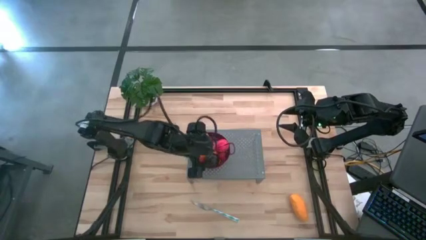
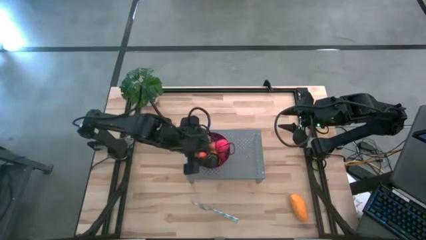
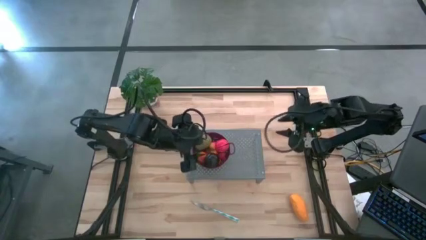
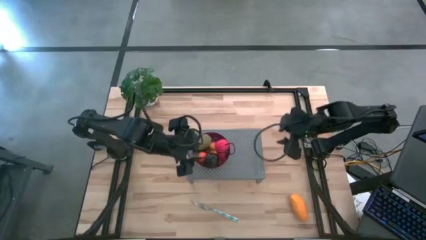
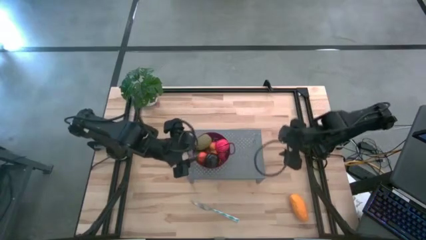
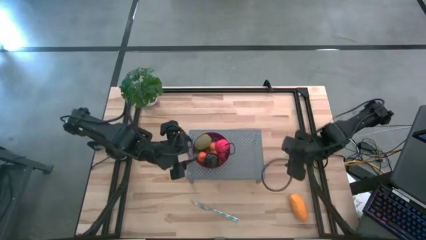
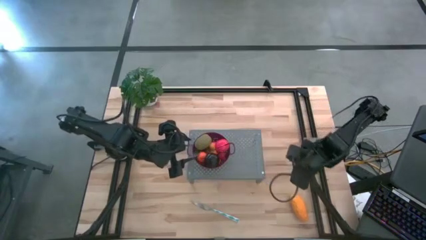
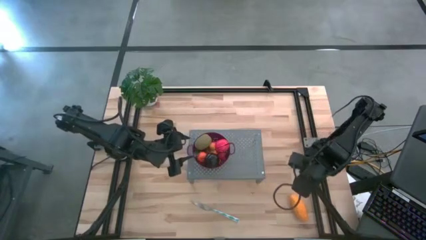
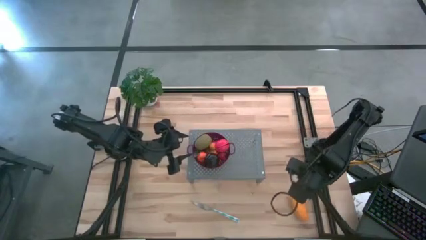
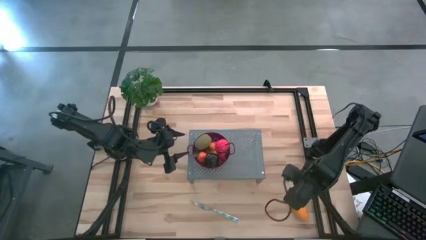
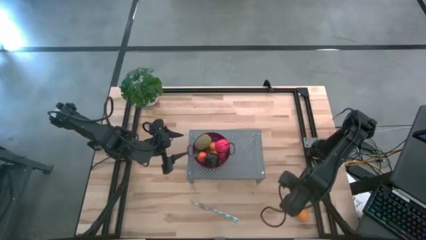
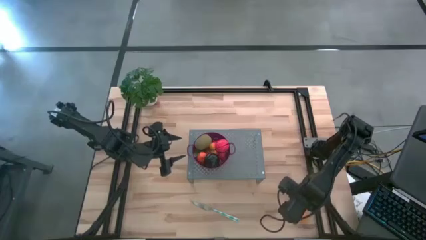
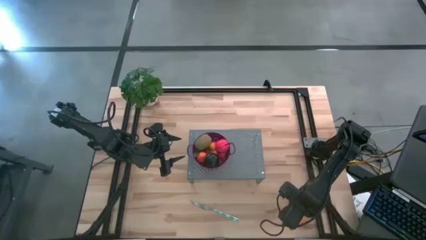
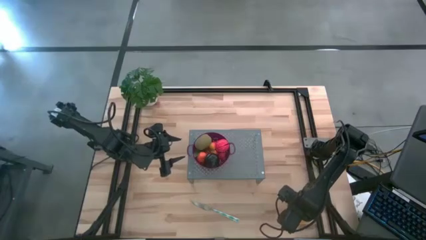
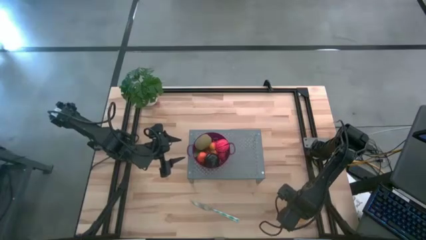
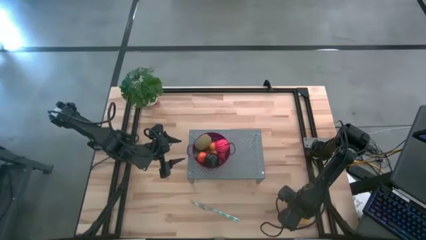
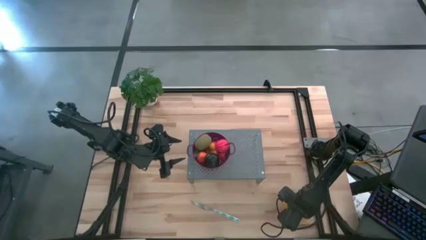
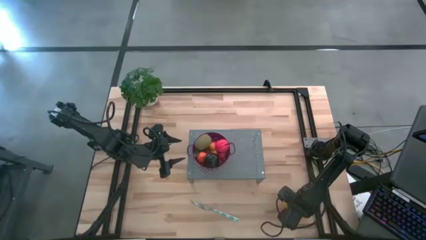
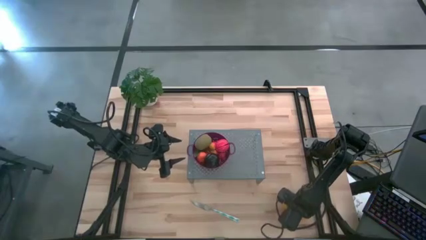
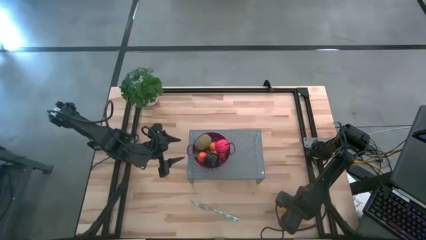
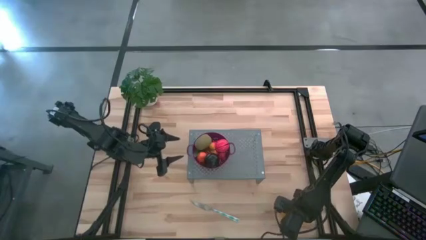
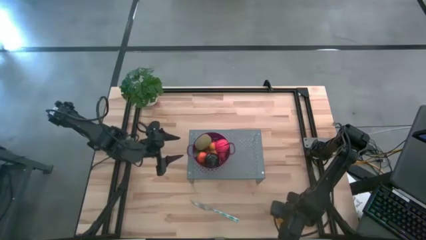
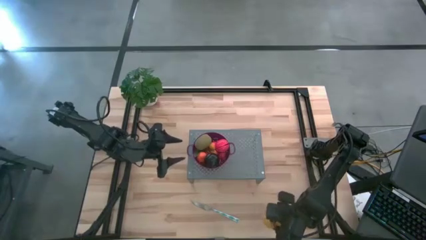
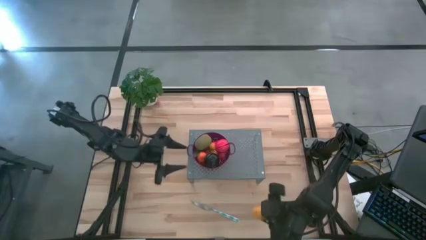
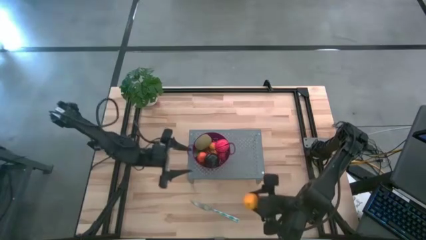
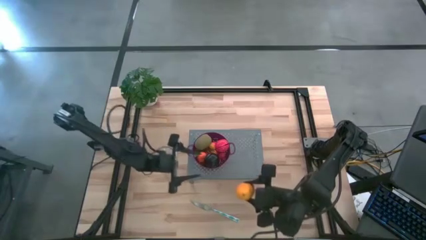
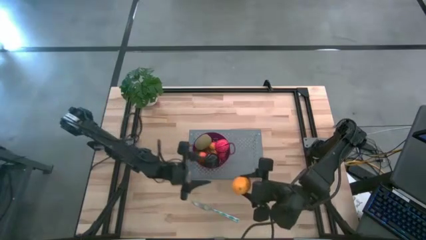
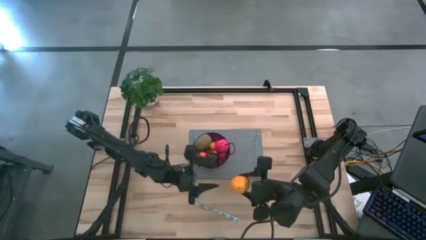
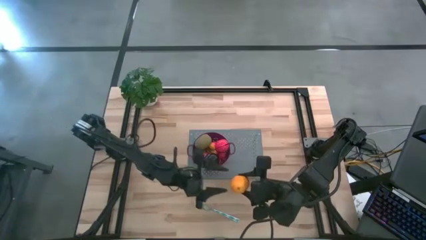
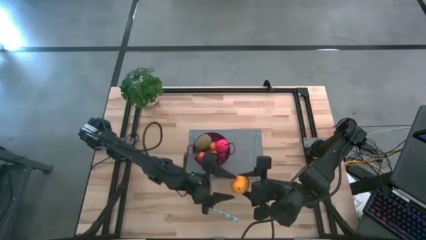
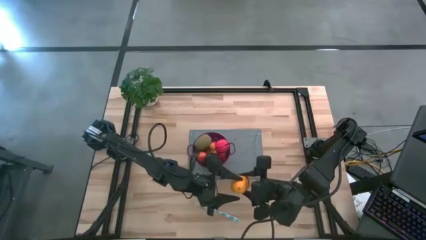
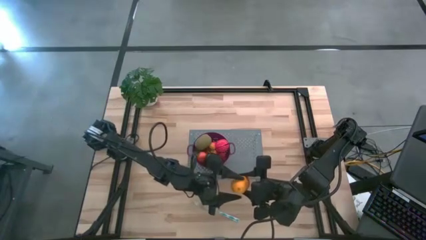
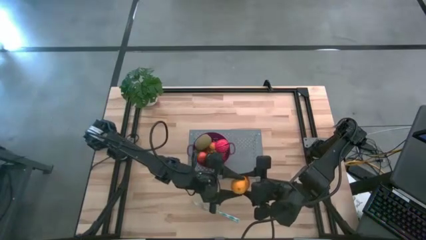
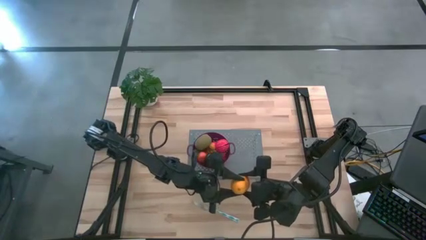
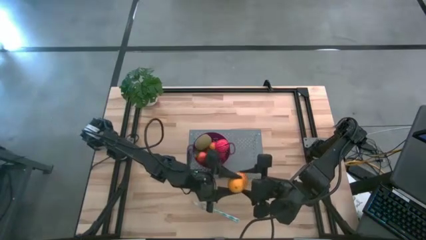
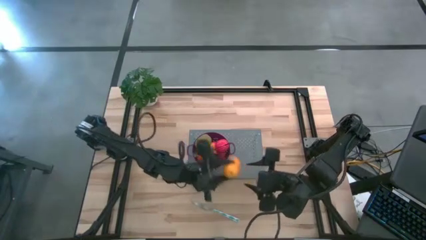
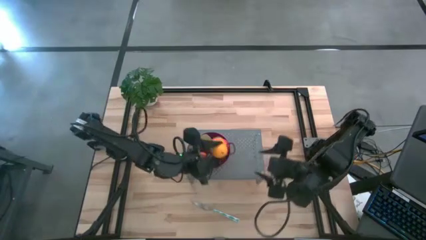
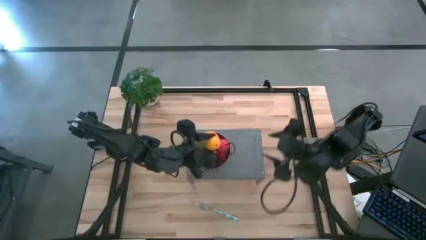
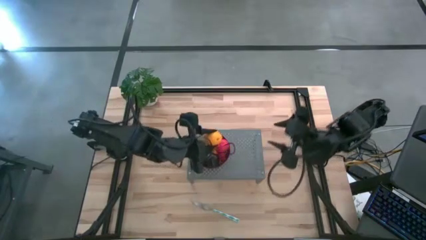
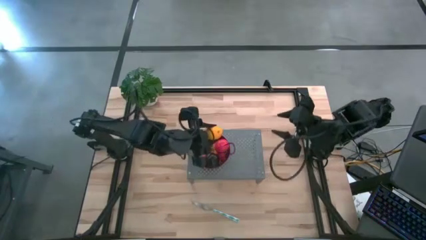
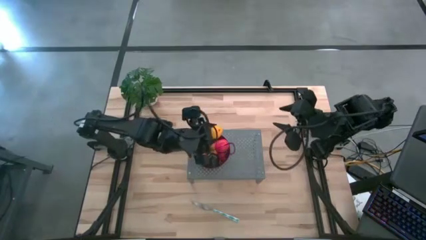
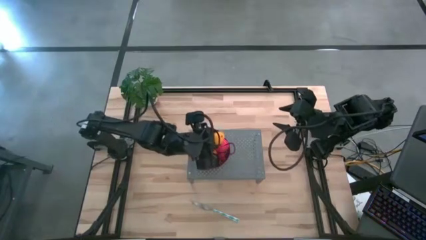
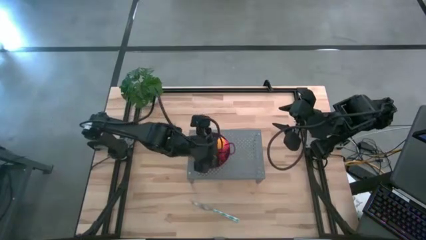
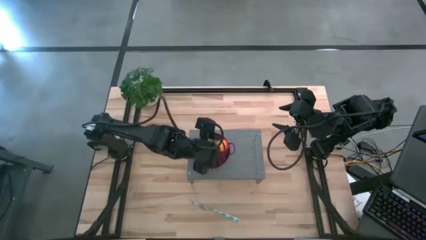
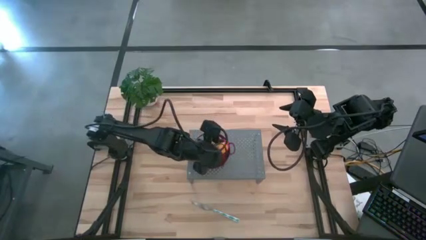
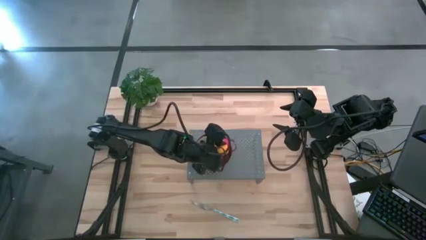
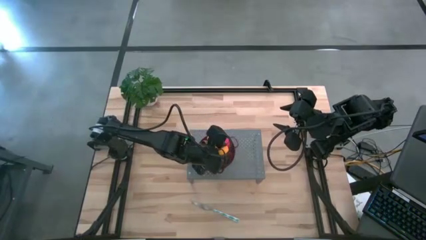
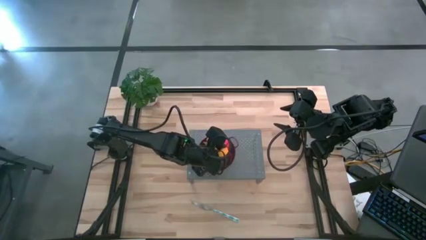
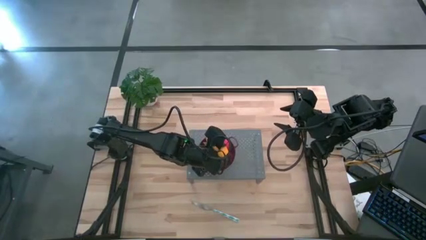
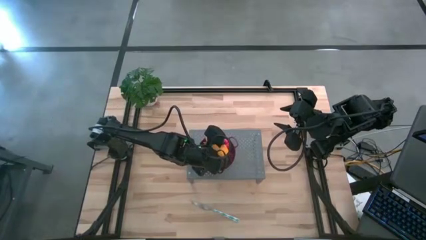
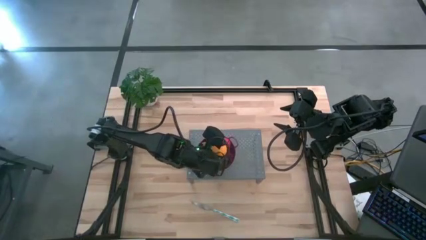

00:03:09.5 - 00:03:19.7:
Task: Pick & Place Fruit
Put the mango into the purple strainer bowl

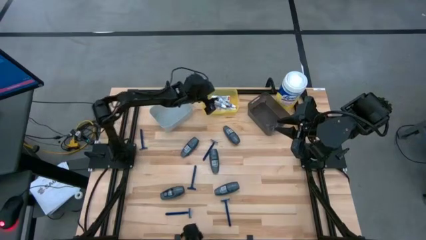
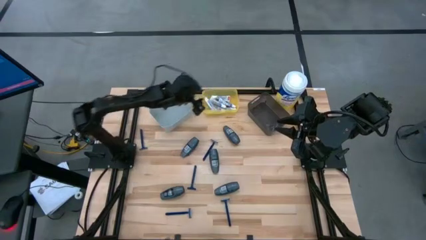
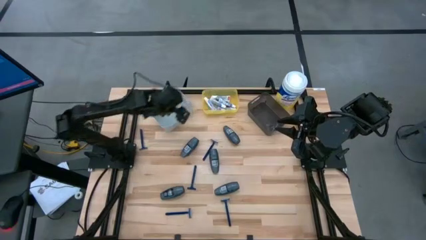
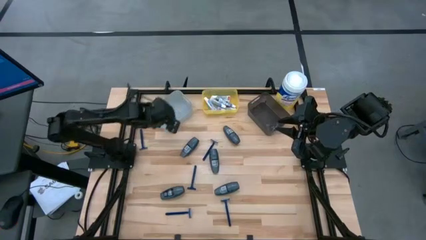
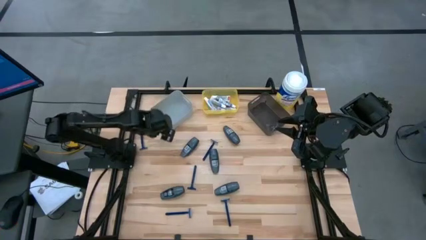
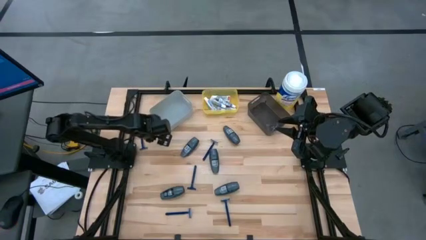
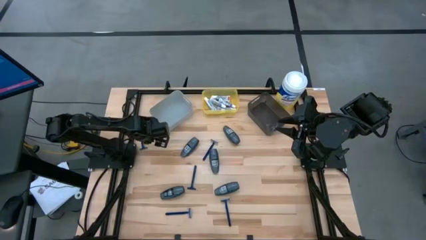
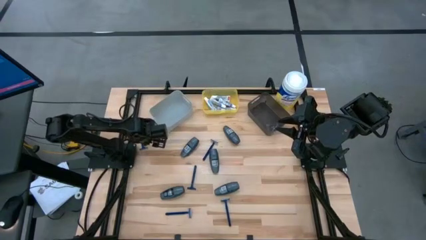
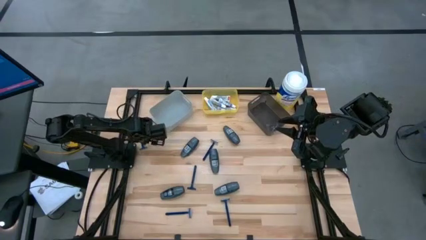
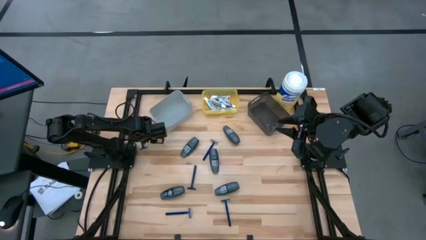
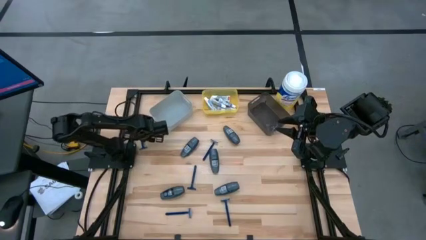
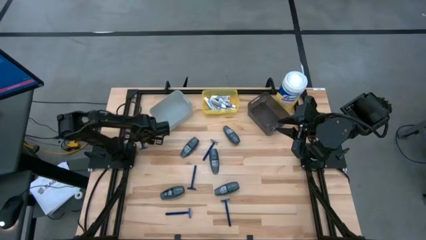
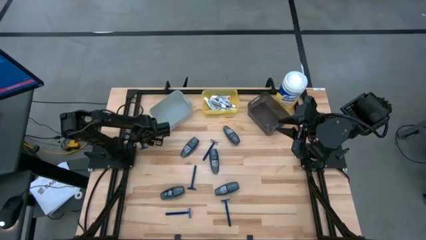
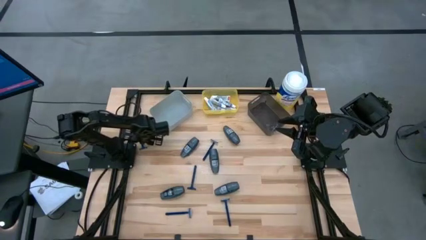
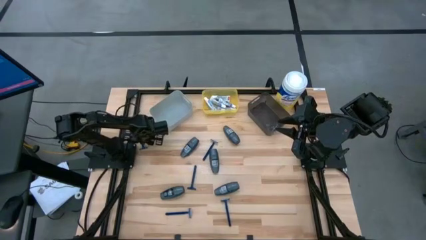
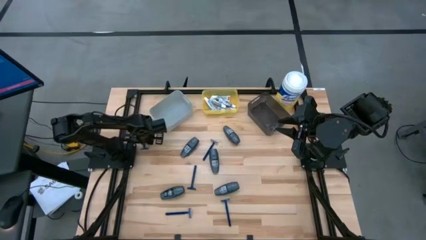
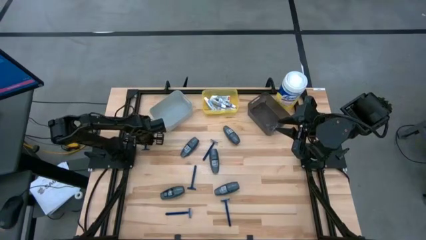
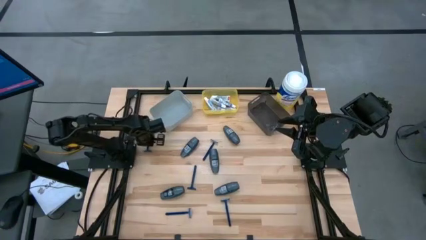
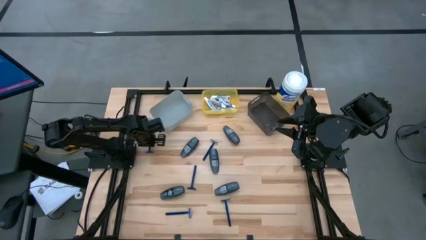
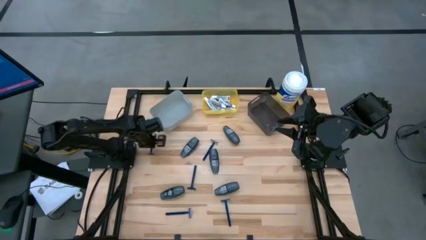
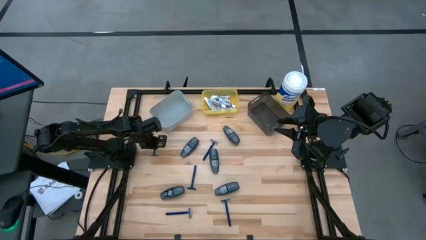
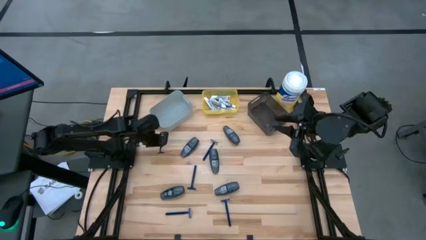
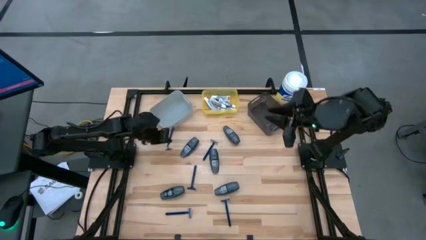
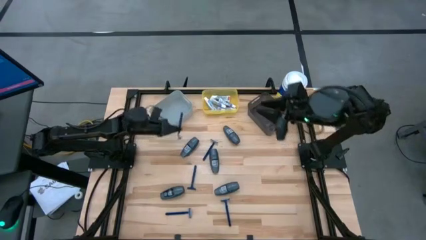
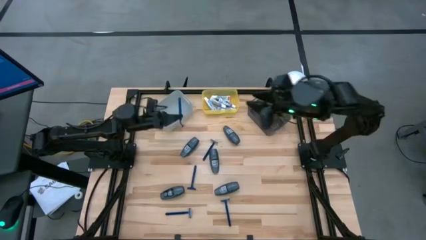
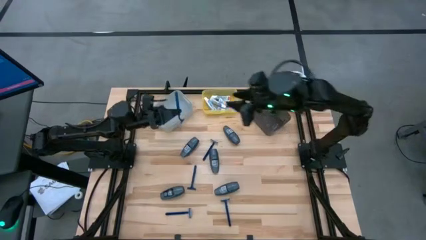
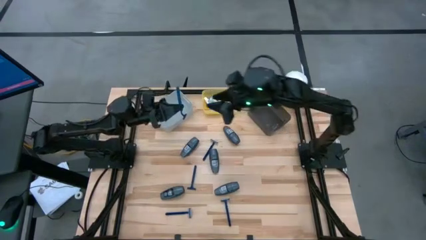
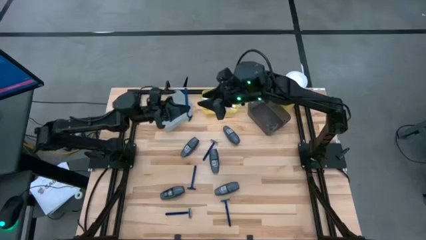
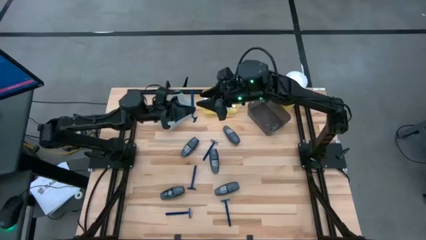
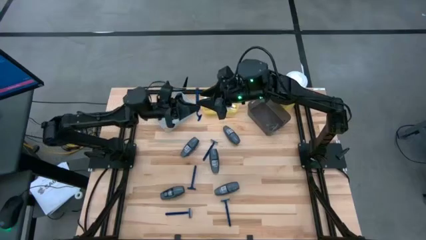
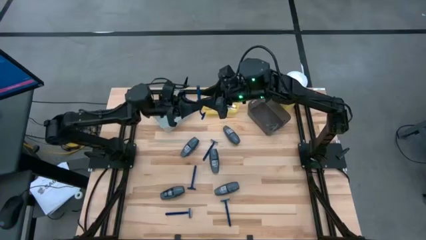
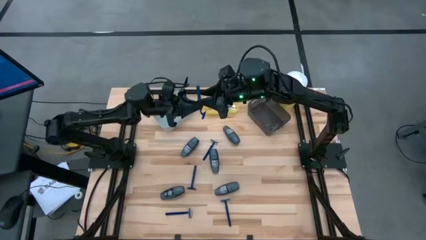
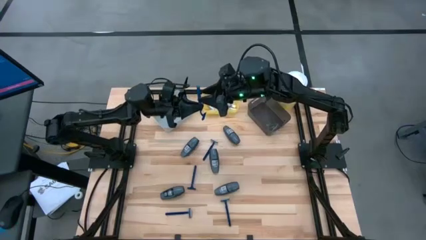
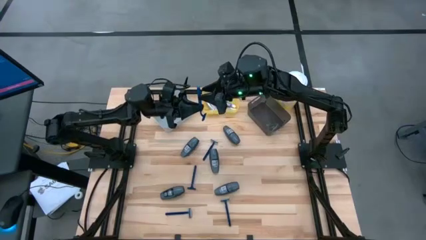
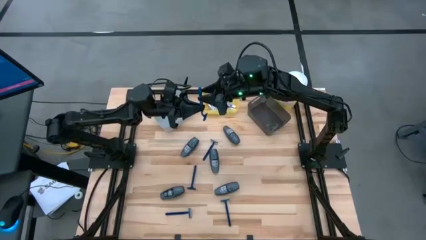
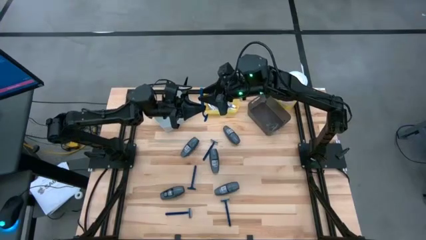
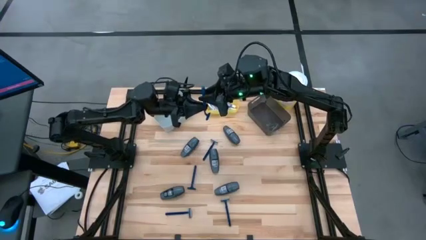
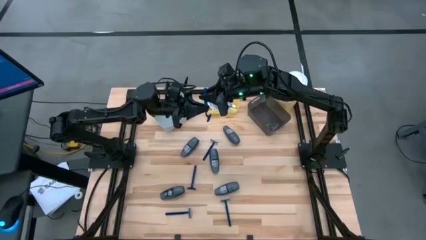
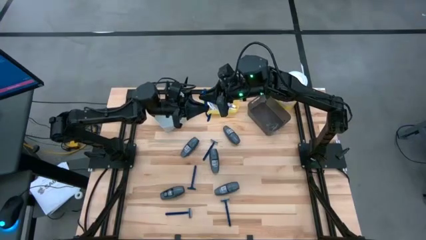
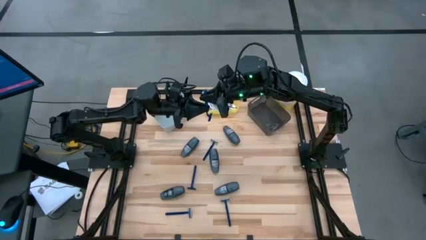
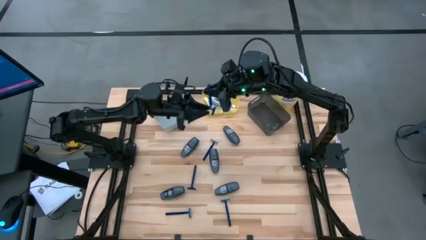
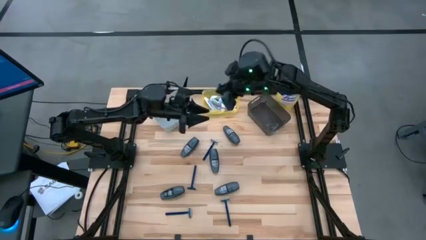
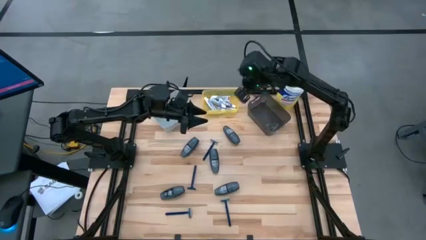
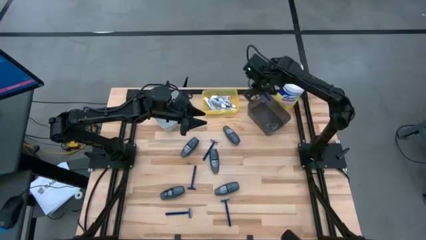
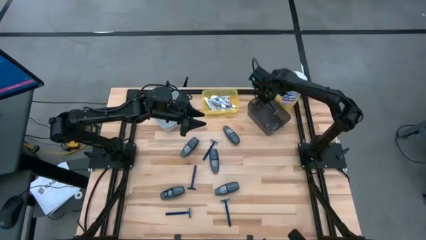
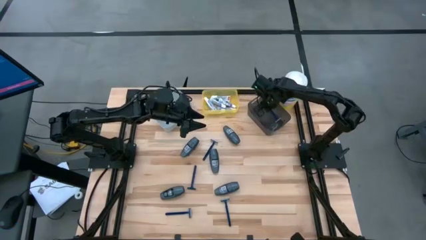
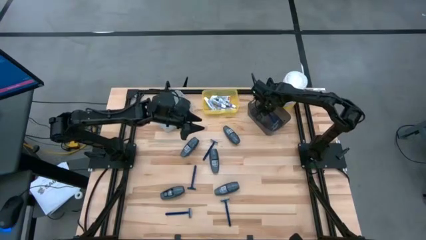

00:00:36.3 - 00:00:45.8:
Task: Pick & Place Travel size toiletries
Put the blue razor into the black bin
